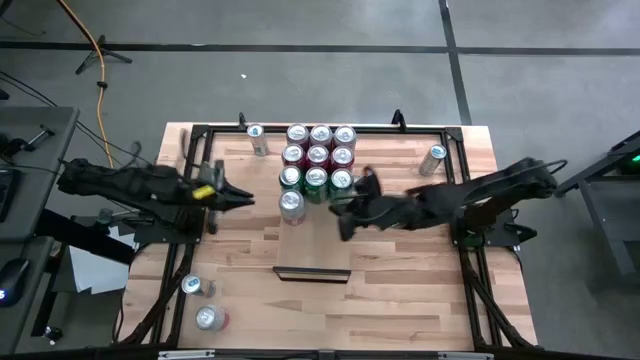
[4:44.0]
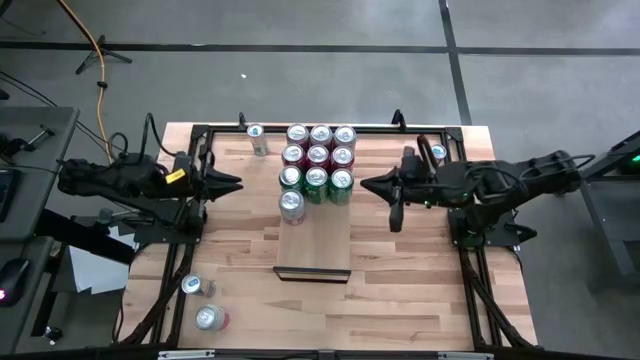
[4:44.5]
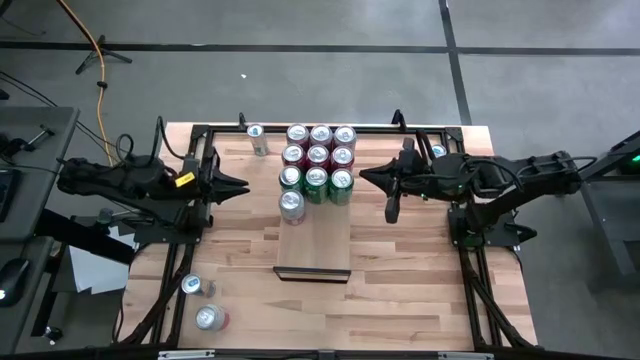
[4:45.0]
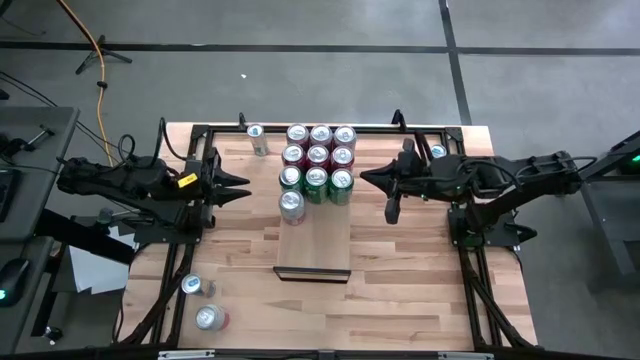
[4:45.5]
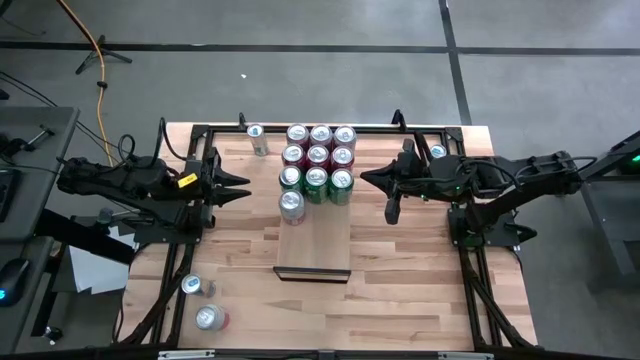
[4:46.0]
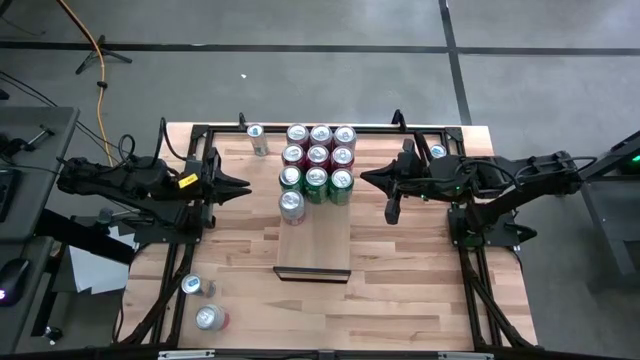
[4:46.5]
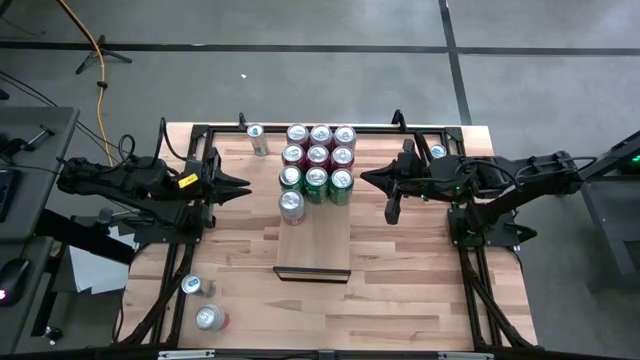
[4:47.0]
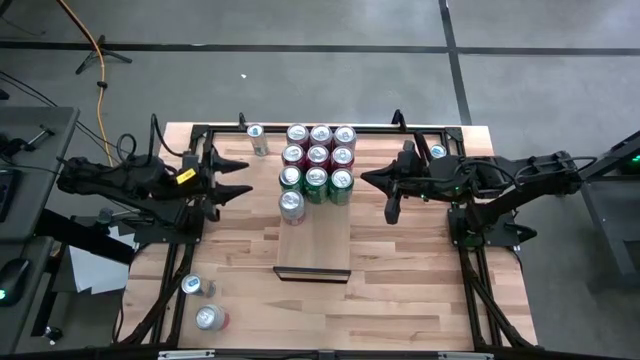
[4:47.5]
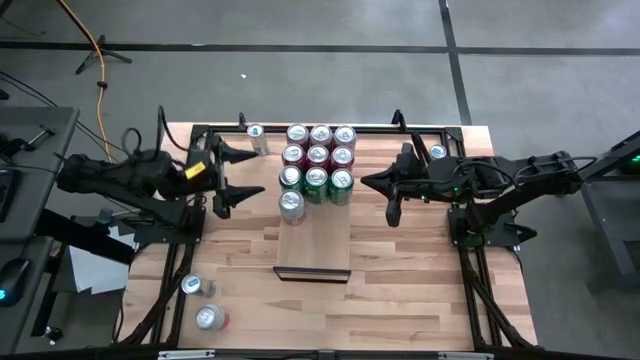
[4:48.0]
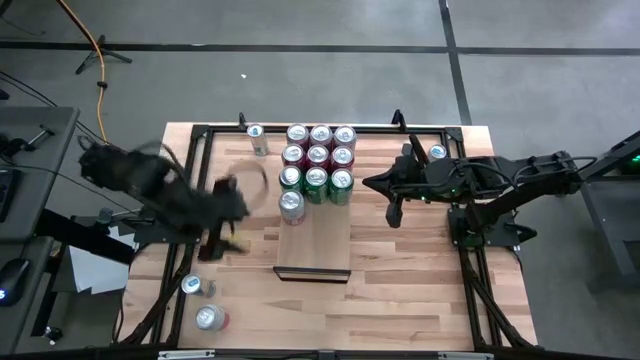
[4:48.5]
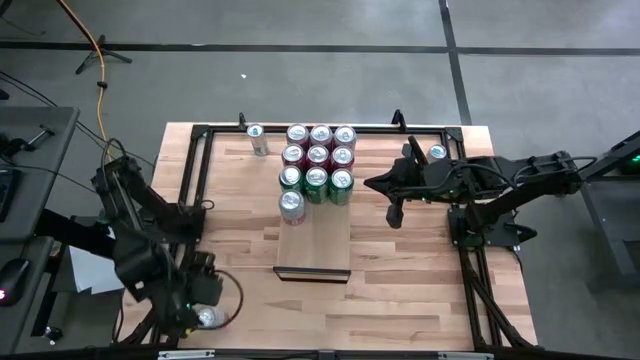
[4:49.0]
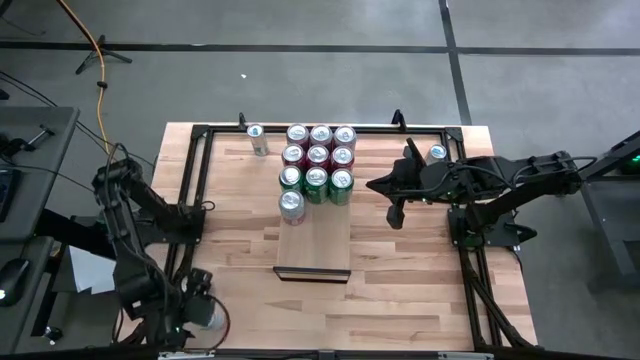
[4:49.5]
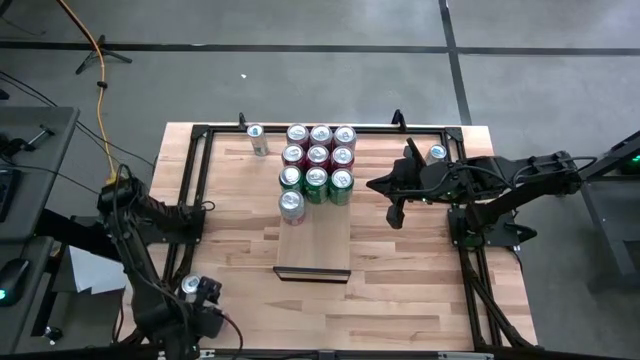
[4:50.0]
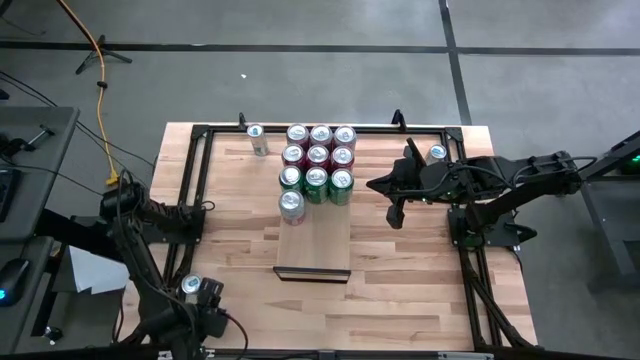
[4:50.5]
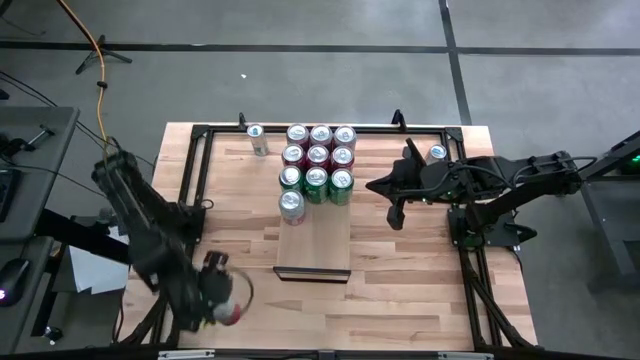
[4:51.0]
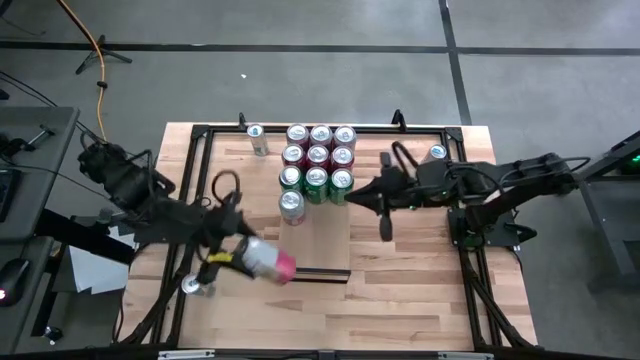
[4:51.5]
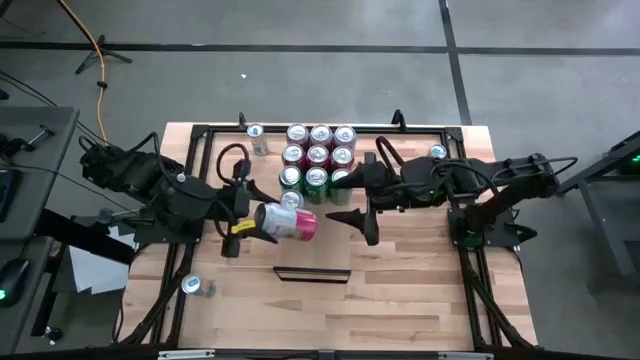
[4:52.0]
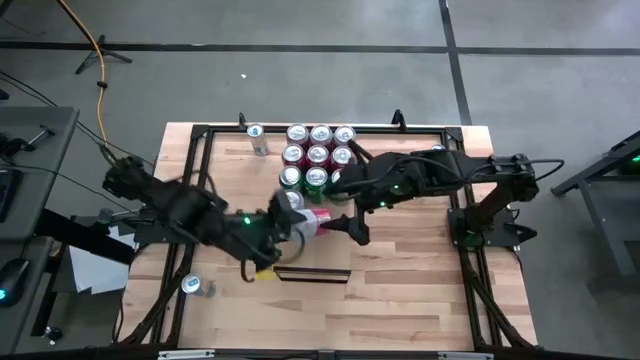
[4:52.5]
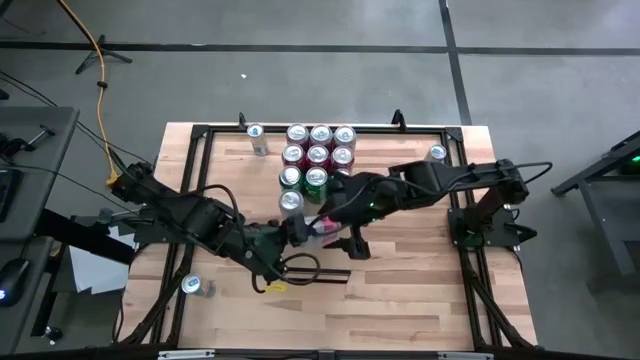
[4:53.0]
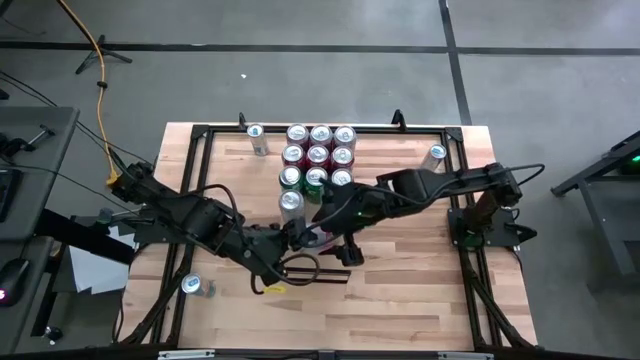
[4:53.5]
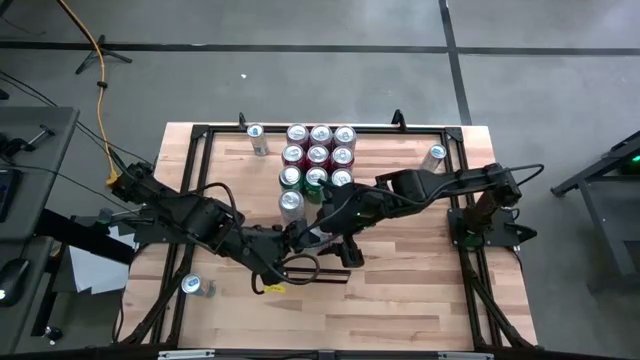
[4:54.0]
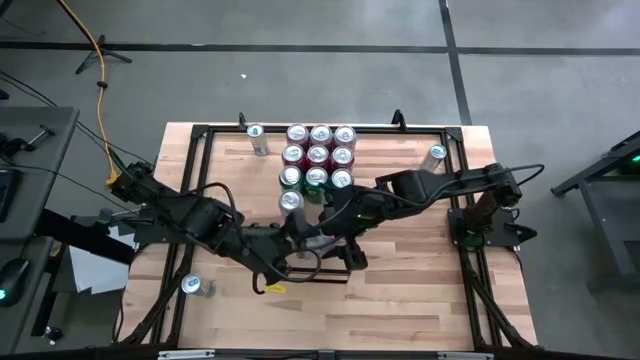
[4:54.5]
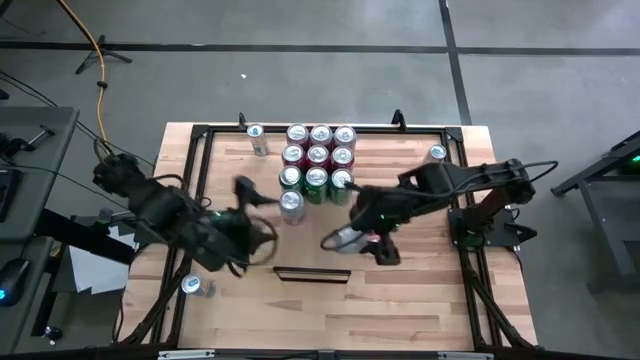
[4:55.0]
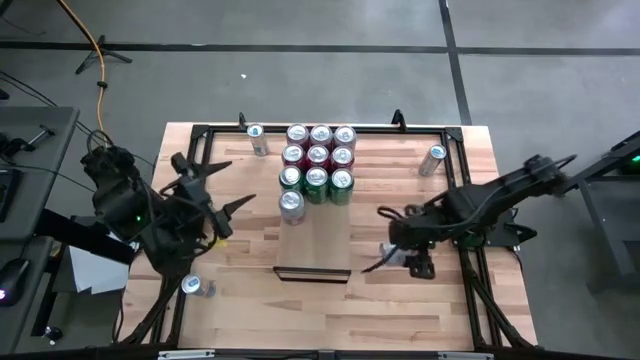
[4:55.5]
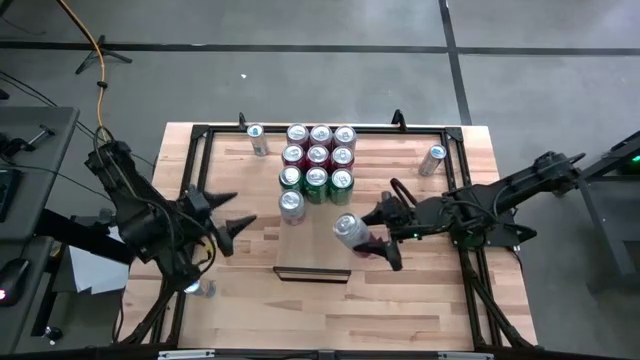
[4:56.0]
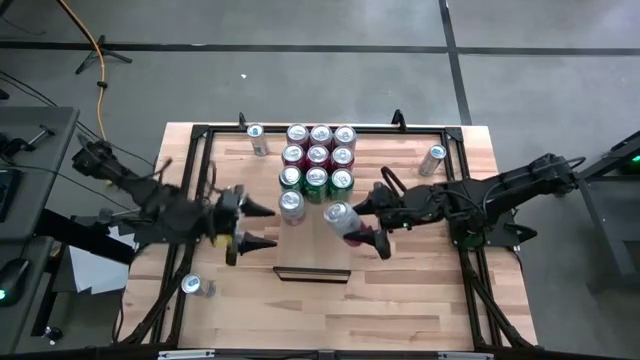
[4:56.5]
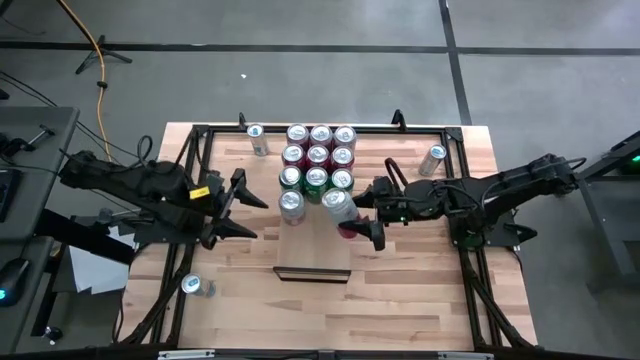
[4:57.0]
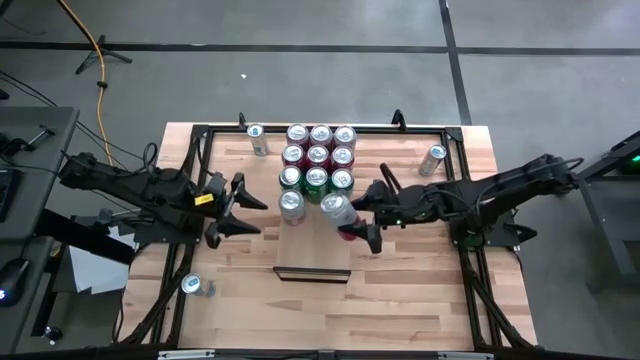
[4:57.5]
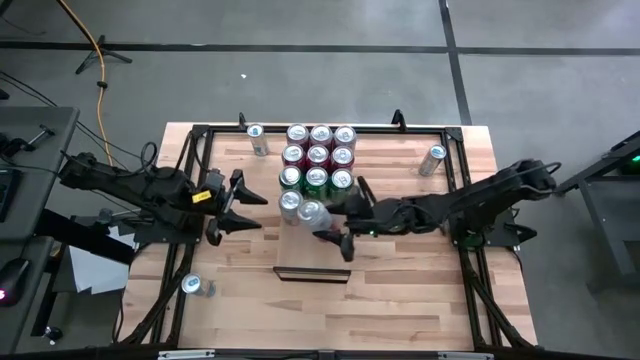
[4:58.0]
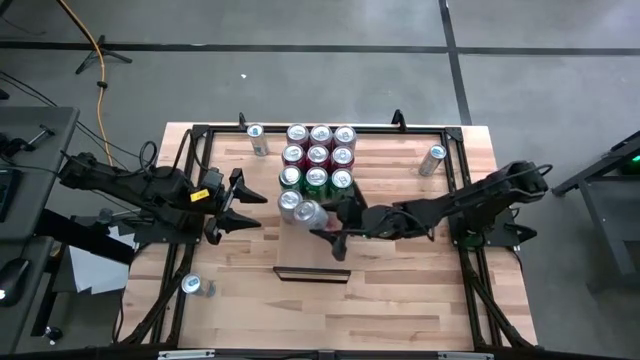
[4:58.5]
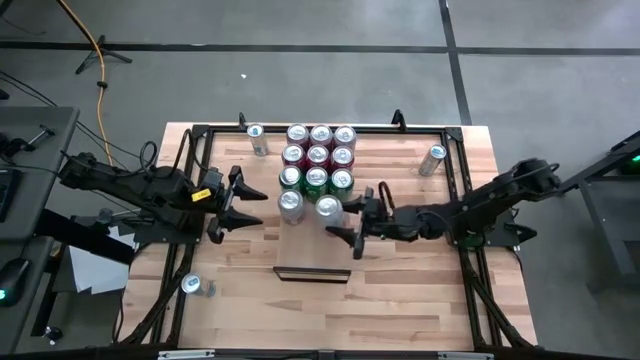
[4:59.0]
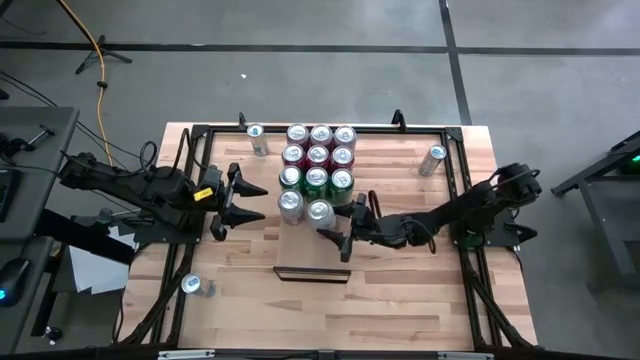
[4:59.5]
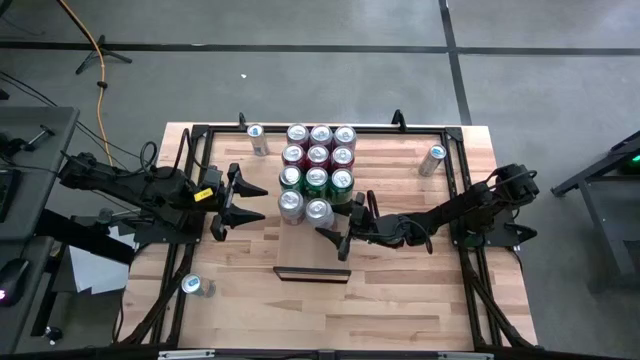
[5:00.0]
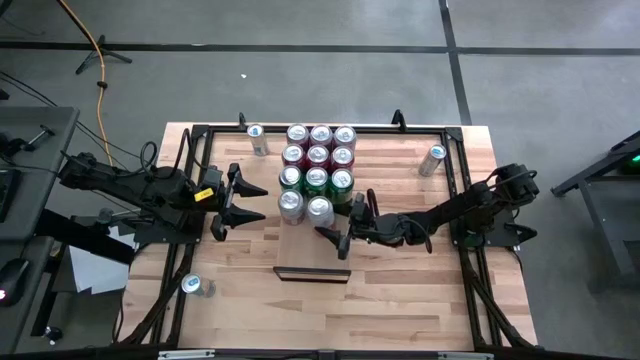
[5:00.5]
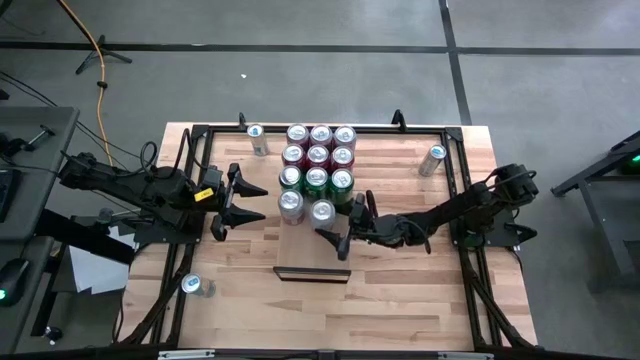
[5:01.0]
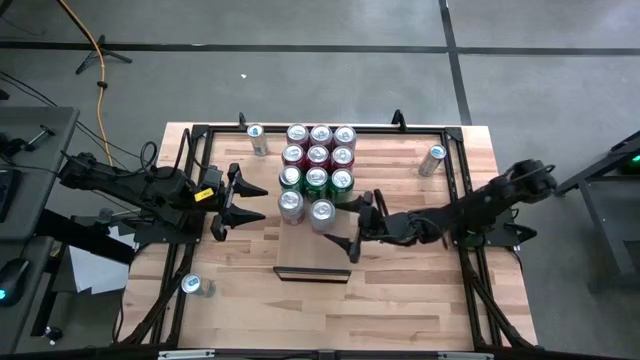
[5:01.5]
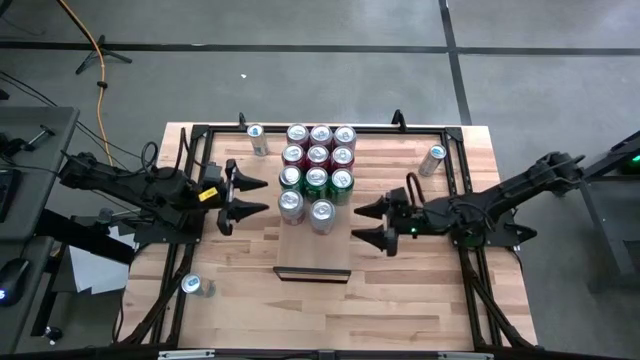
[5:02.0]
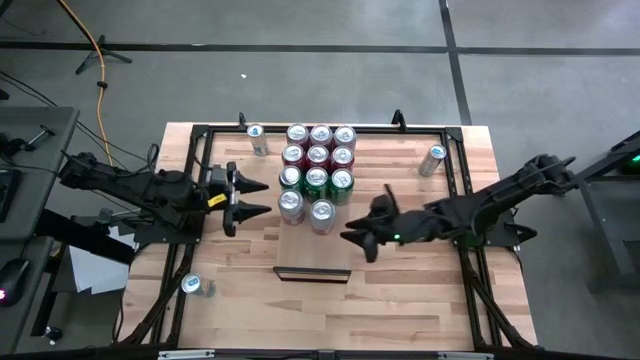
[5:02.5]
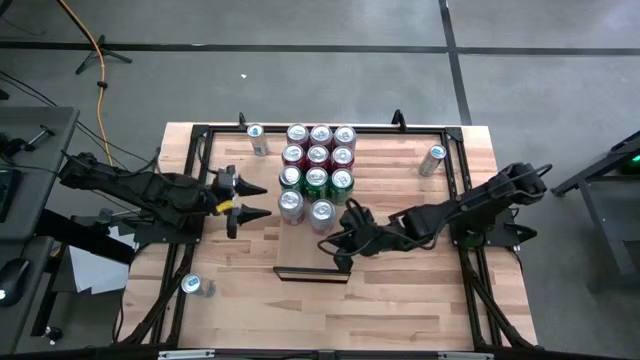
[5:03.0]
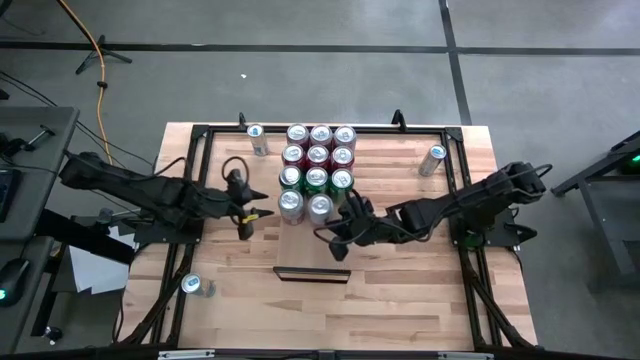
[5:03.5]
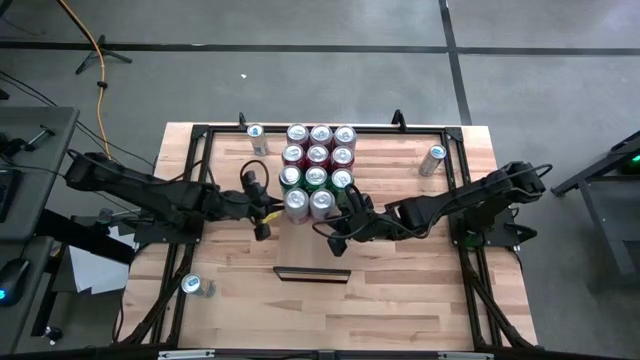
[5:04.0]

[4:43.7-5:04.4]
Task: Place canned beverage on shelf
Put the bottom left pink soda can on the shelf

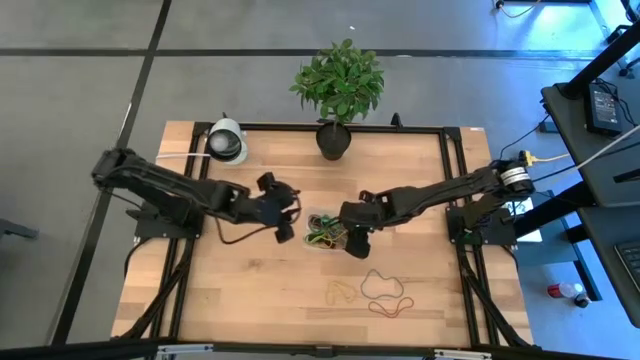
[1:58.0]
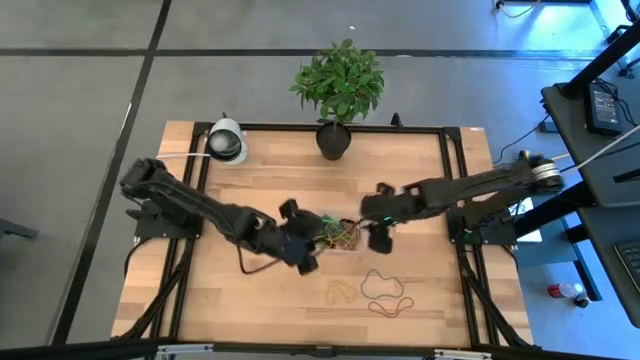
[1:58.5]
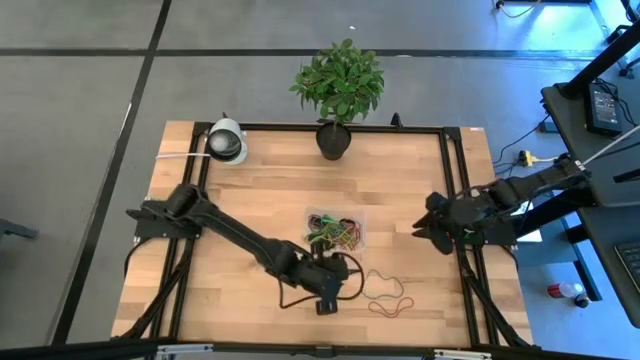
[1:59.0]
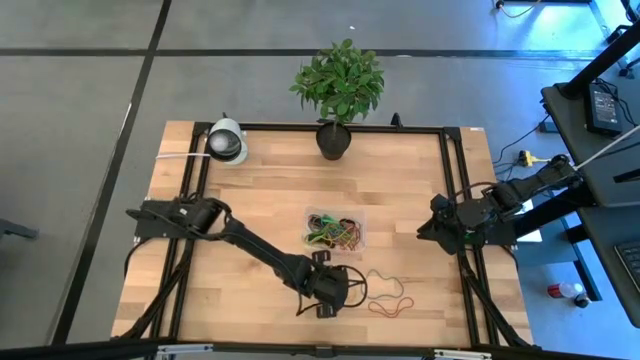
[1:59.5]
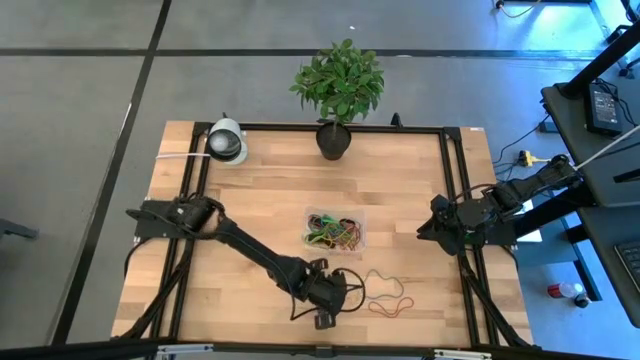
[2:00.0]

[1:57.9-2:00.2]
Task: Pick and place rubber bands into bin
Put the yellow rubber band into the bin
